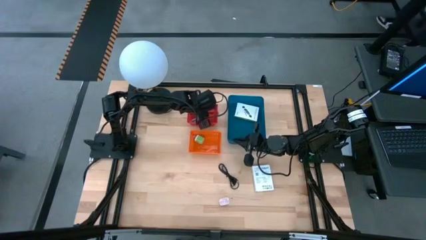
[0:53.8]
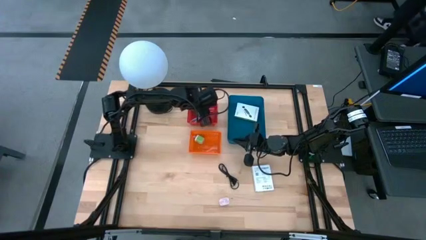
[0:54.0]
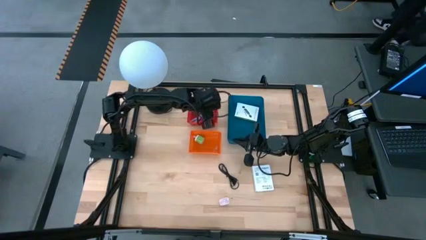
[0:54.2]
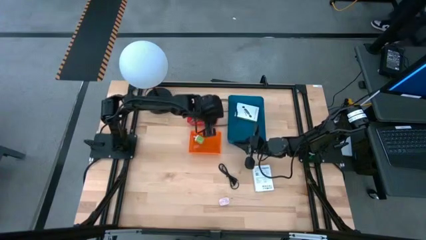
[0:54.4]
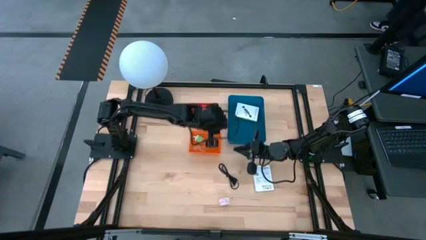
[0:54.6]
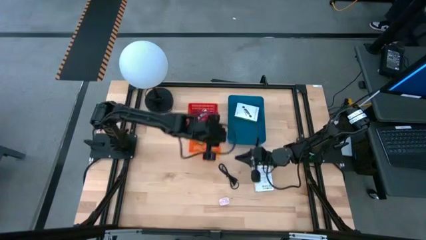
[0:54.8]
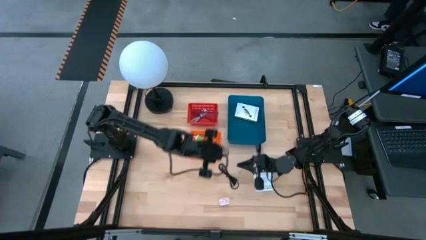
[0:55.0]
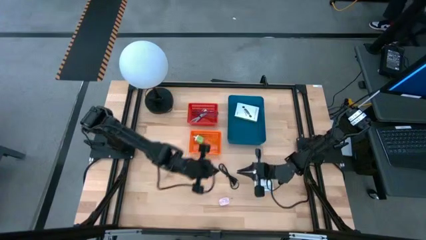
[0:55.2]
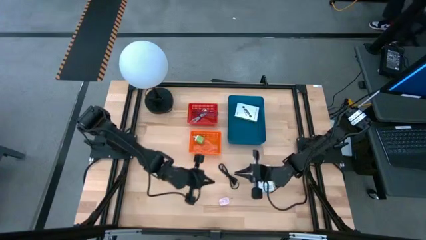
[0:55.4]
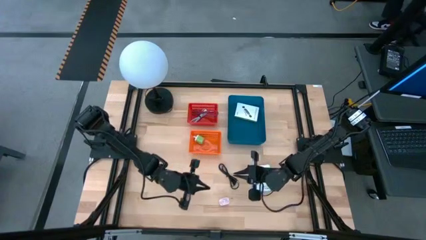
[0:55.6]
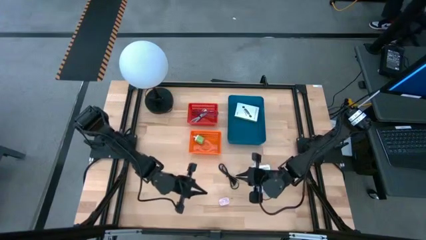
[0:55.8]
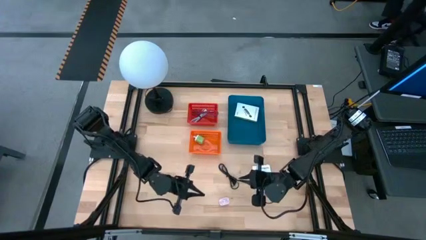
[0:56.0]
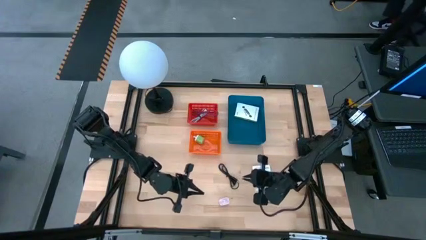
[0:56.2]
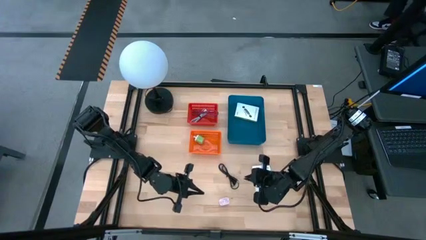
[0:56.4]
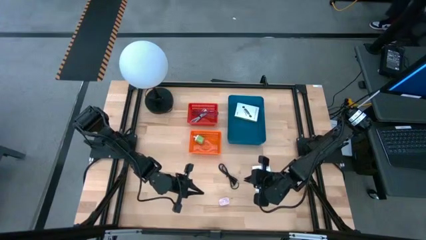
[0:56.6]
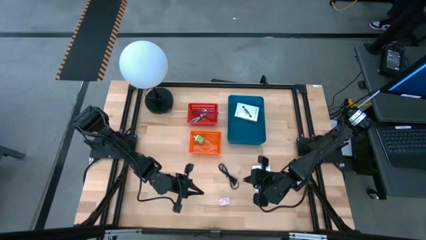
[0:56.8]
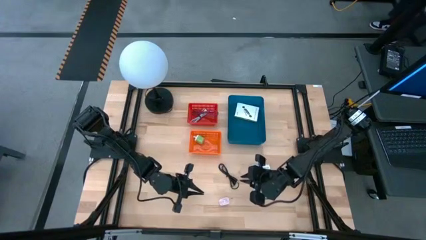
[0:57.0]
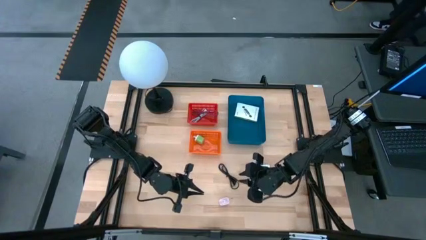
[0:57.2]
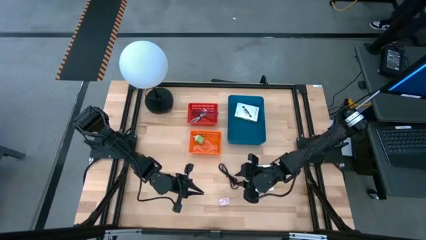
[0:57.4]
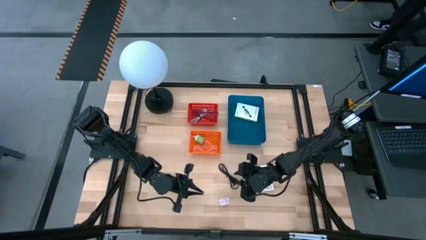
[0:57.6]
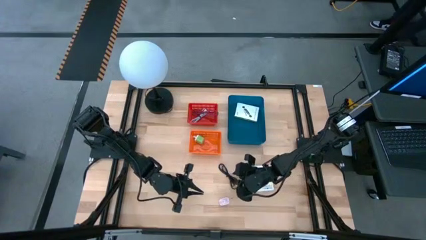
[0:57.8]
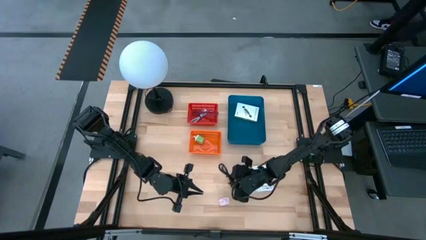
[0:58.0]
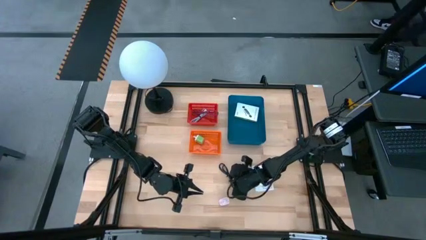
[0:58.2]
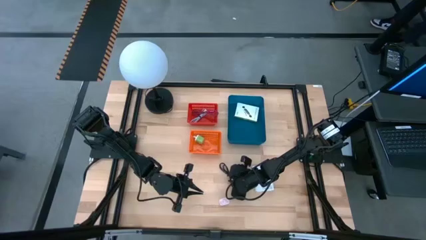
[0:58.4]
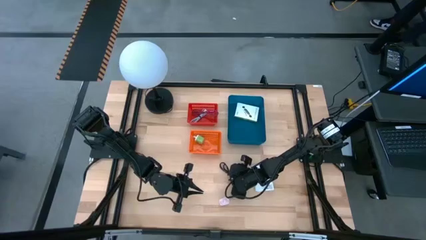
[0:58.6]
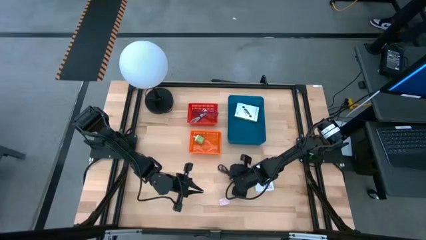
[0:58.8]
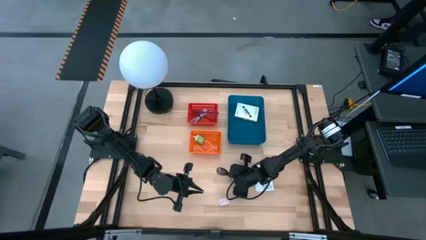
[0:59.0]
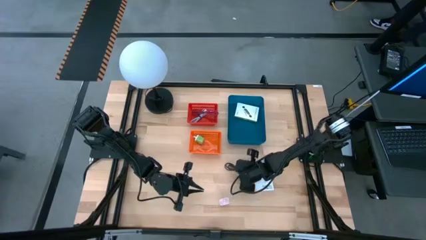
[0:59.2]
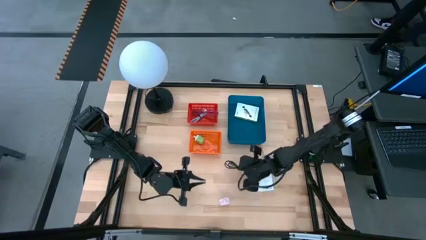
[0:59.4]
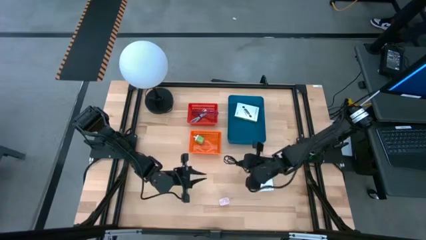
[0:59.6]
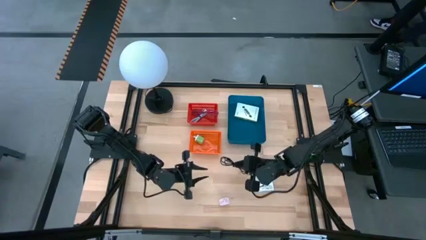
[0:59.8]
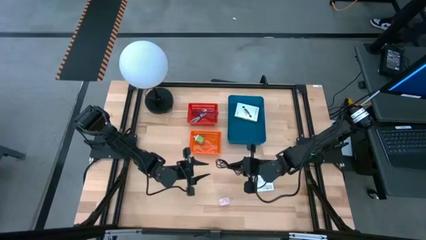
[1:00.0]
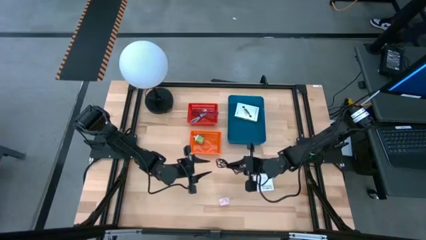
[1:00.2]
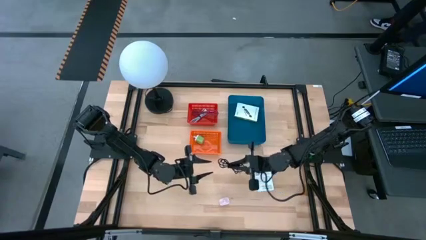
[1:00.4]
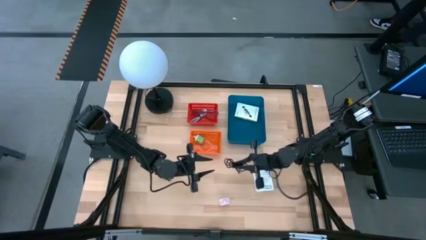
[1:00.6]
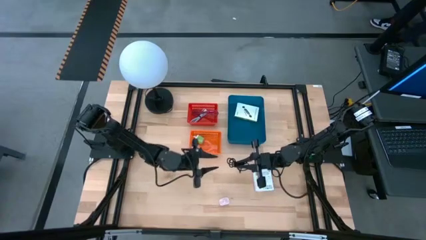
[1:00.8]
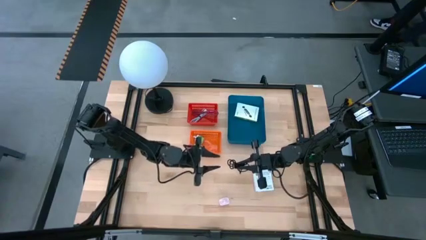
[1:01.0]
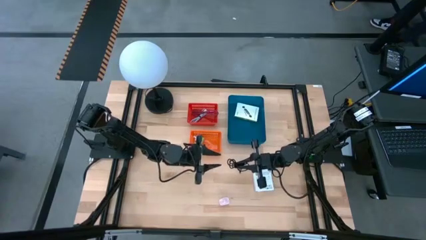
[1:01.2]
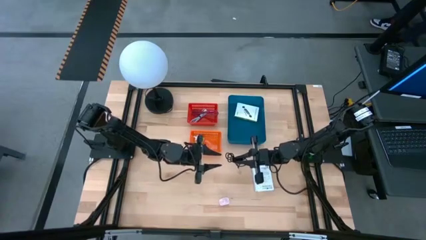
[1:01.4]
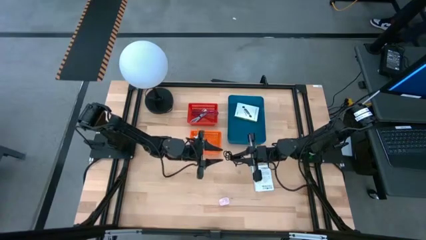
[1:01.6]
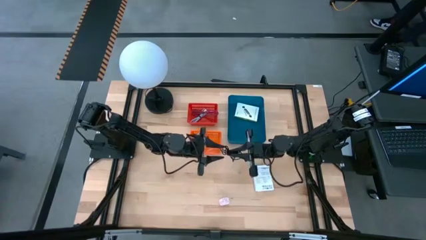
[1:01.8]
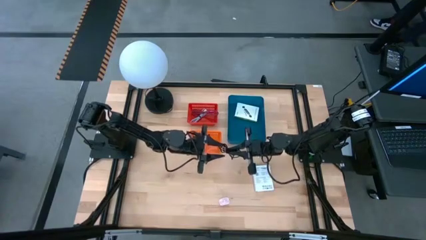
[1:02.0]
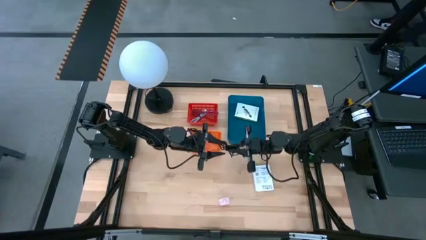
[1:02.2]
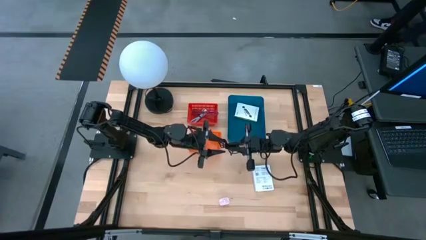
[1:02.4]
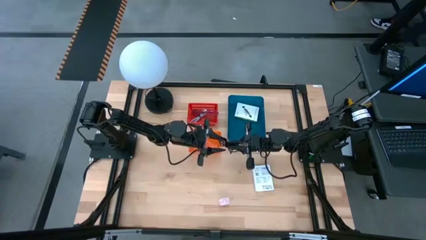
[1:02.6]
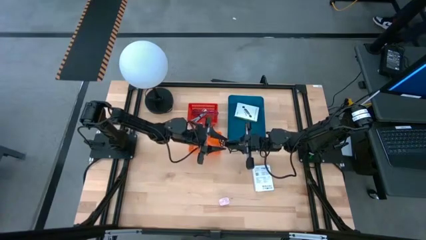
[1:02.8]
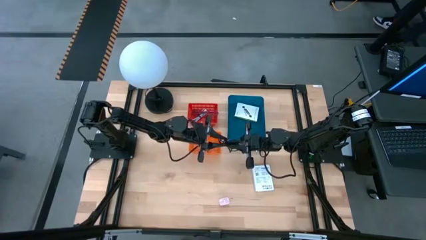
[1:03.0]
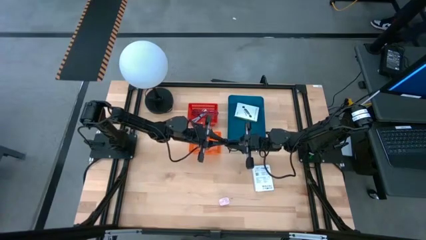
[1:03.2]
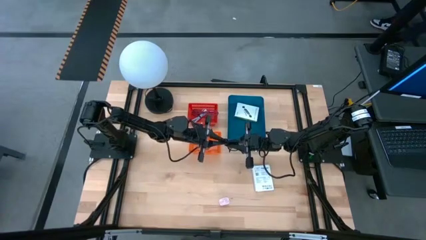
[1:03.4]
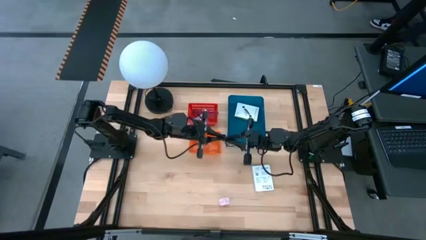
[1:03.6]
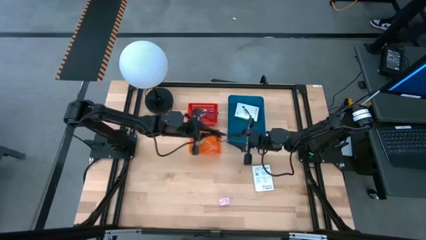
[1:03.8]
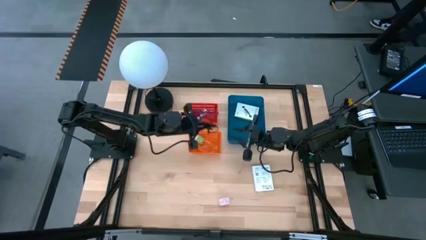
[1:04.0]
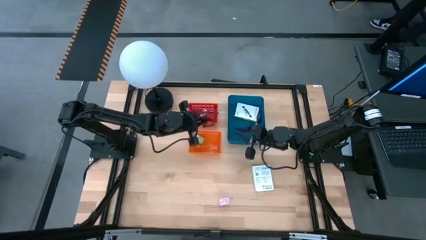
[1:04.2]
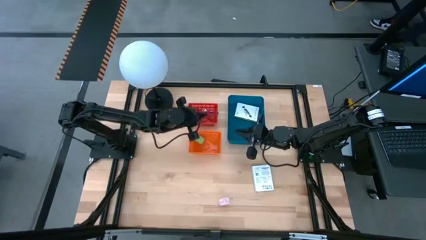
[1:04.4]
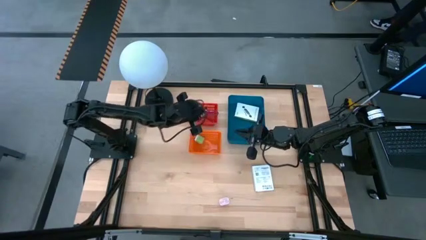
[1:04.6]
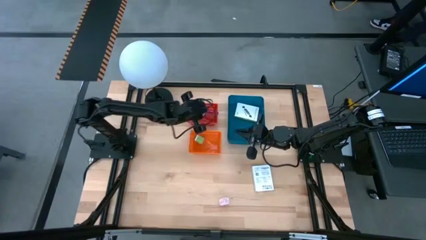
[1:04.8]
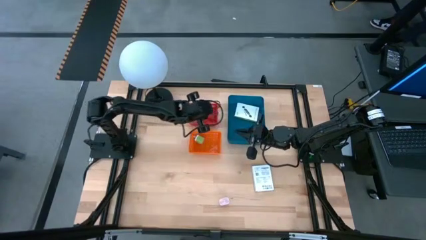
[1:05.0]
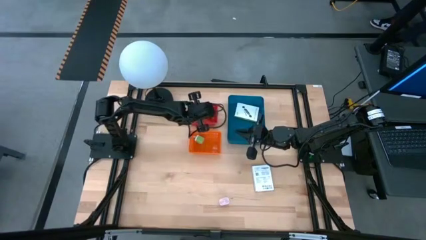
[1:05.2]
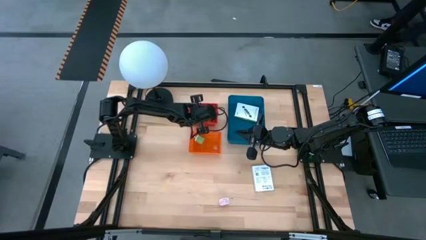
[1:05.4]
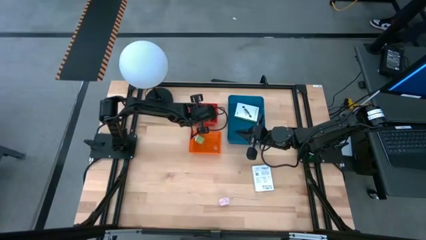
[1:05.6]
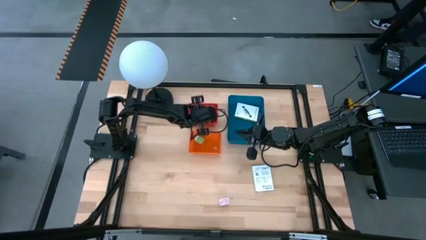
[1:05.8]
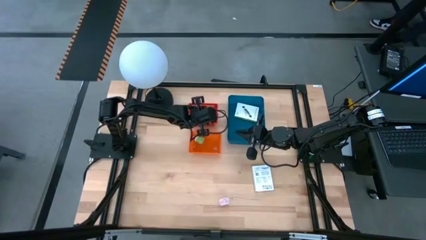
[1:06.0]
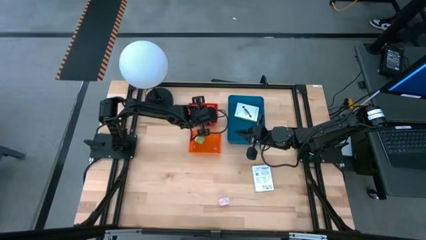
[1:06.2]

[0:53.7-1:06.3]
Task: Pick and place items into bin
Put the black charger cable into the red bin
